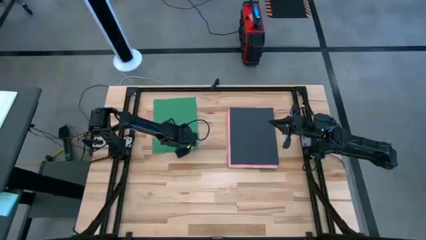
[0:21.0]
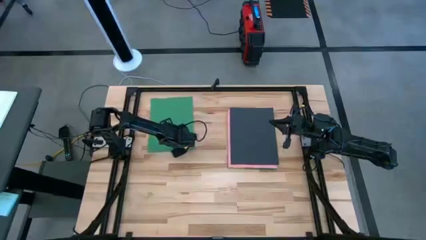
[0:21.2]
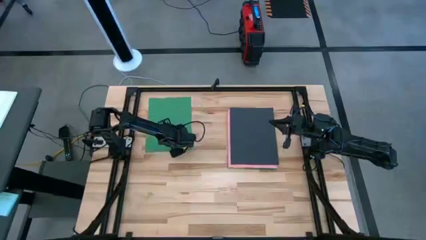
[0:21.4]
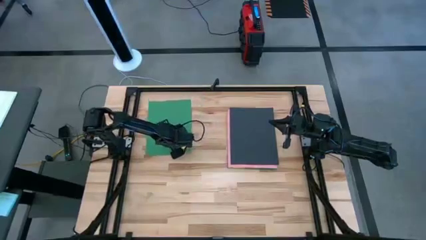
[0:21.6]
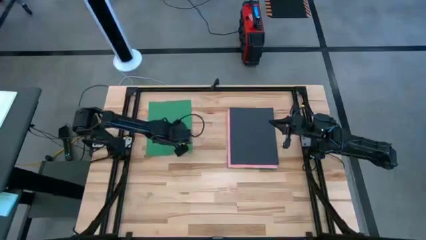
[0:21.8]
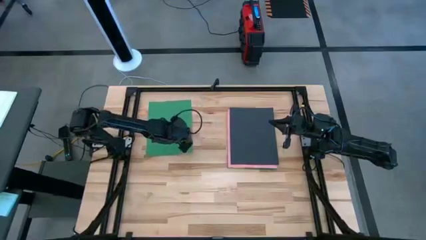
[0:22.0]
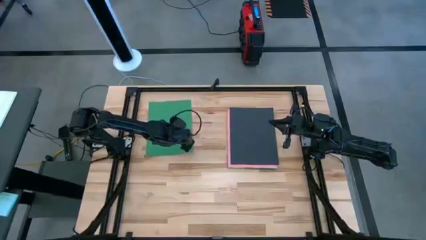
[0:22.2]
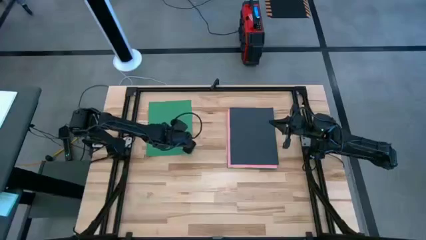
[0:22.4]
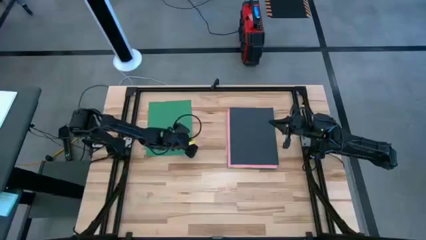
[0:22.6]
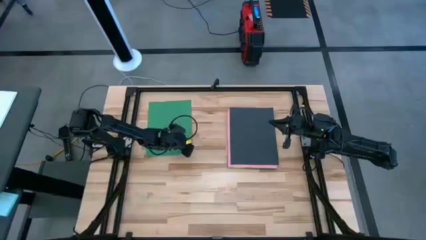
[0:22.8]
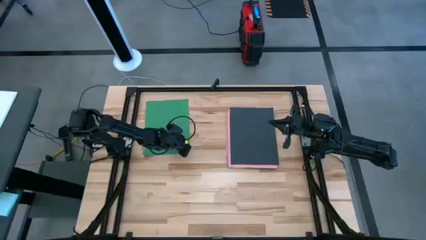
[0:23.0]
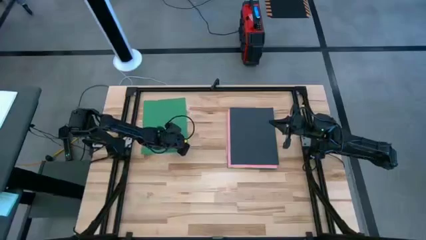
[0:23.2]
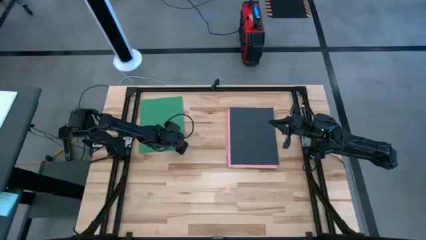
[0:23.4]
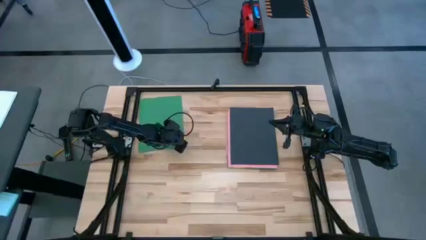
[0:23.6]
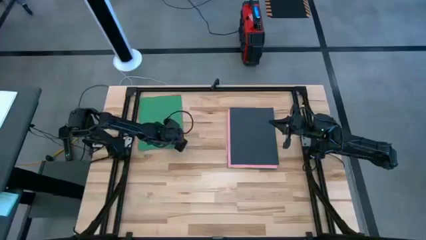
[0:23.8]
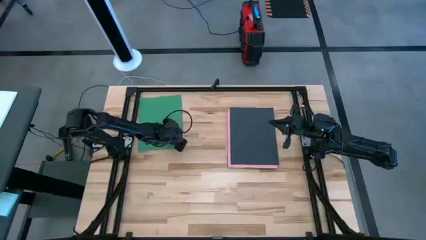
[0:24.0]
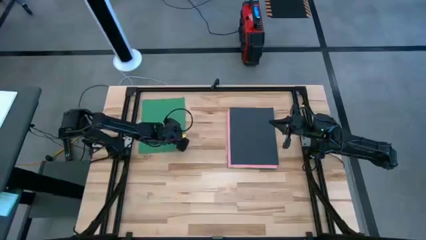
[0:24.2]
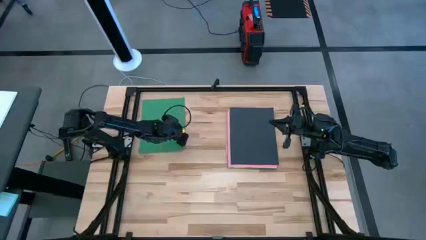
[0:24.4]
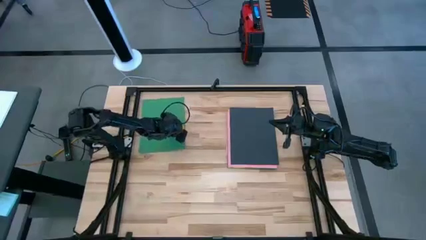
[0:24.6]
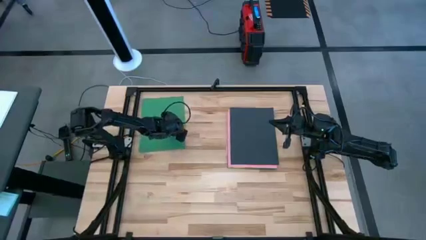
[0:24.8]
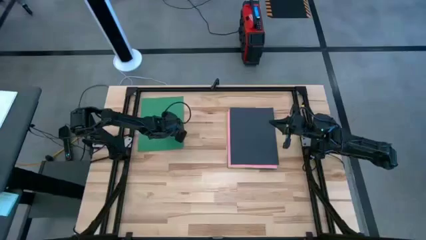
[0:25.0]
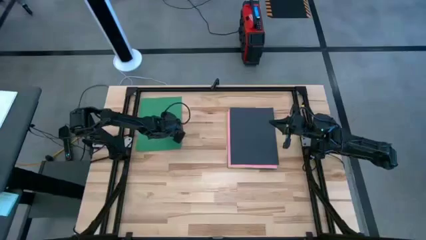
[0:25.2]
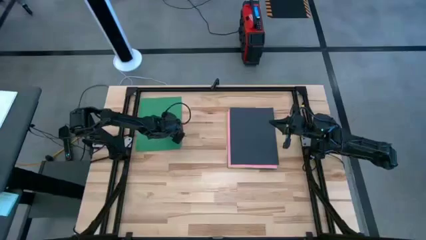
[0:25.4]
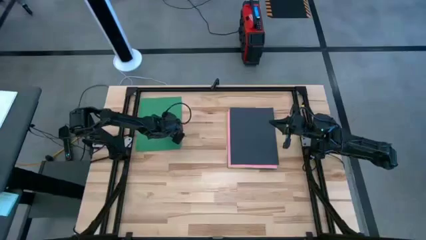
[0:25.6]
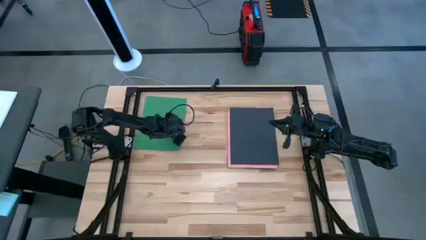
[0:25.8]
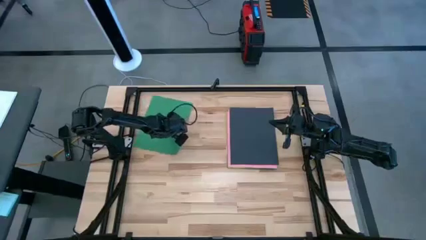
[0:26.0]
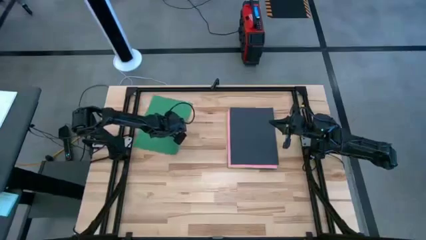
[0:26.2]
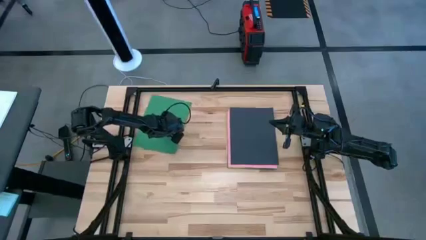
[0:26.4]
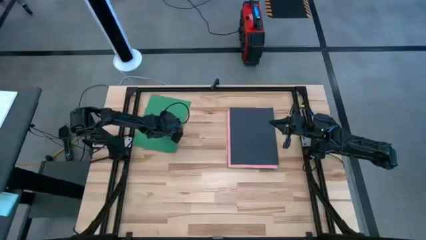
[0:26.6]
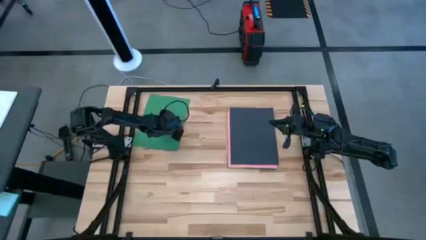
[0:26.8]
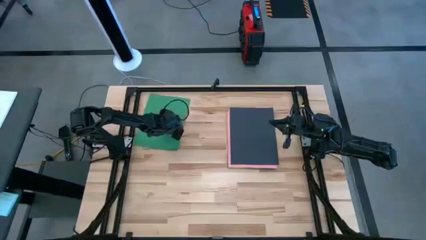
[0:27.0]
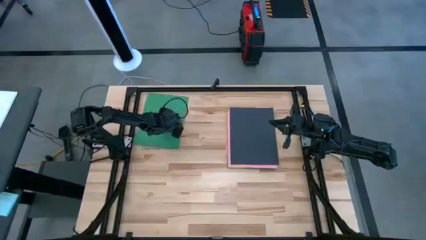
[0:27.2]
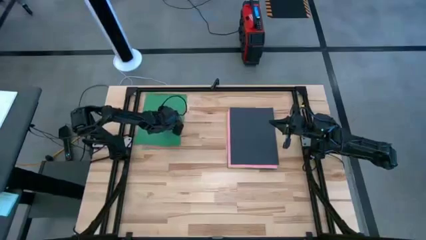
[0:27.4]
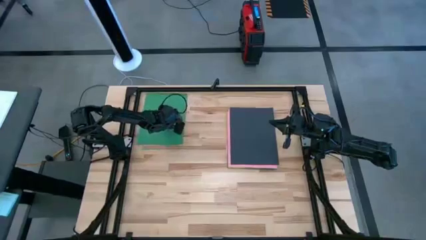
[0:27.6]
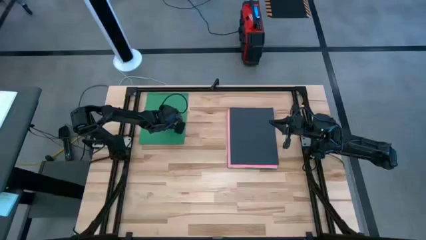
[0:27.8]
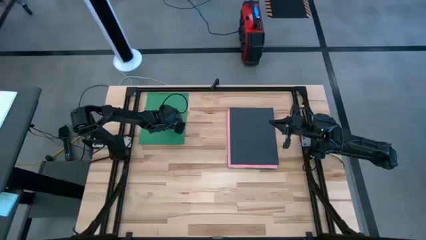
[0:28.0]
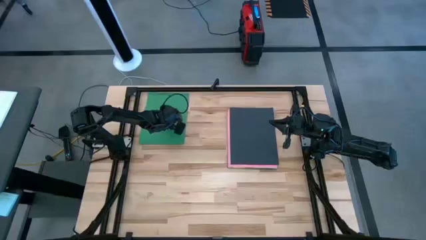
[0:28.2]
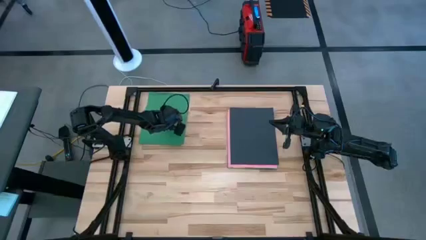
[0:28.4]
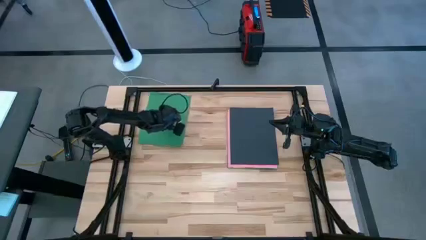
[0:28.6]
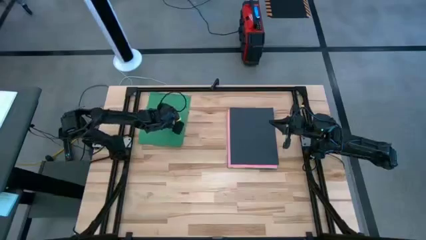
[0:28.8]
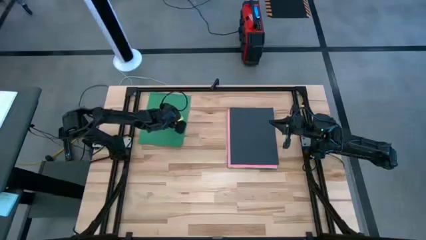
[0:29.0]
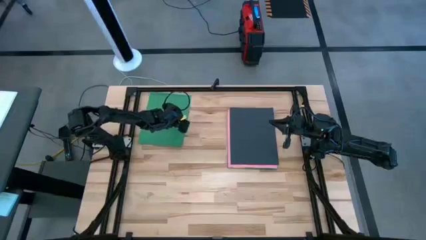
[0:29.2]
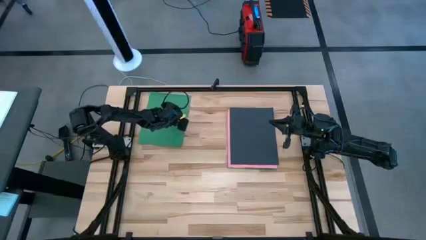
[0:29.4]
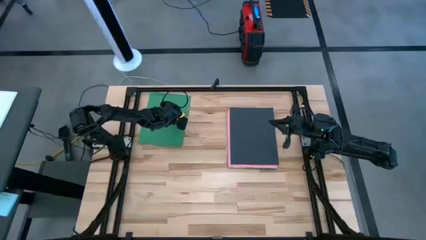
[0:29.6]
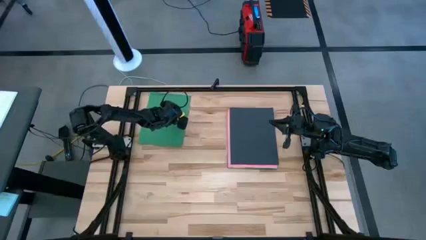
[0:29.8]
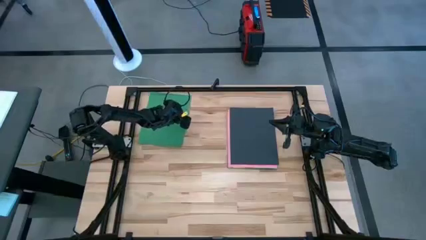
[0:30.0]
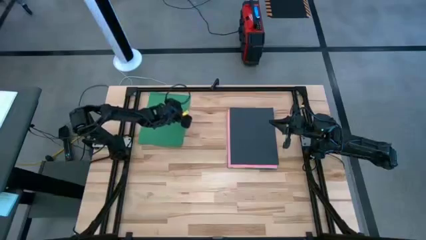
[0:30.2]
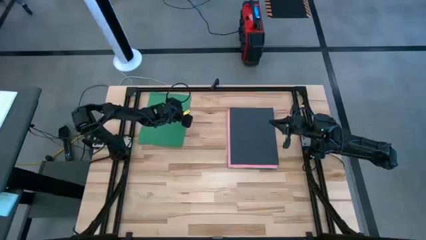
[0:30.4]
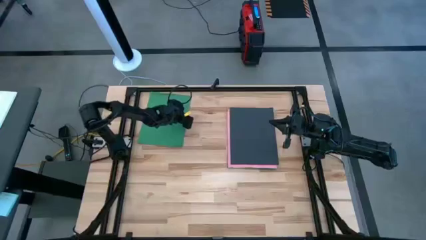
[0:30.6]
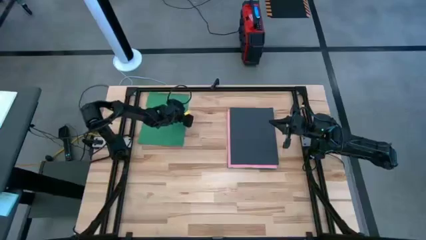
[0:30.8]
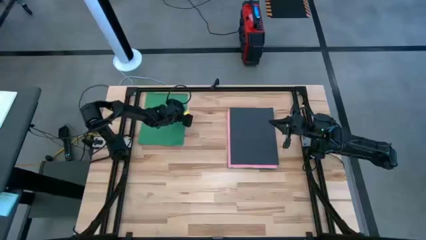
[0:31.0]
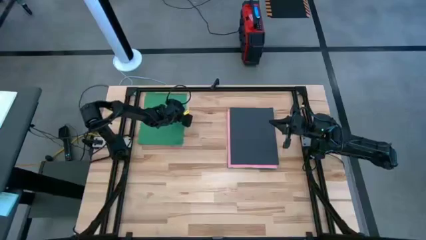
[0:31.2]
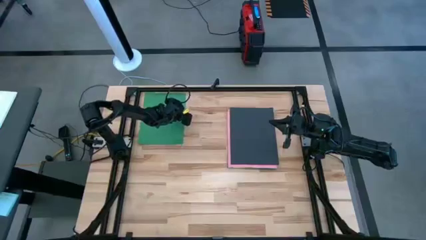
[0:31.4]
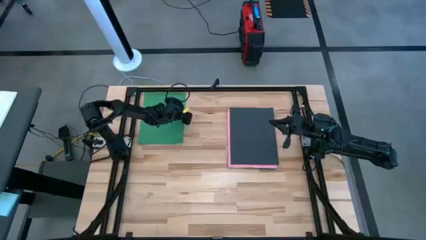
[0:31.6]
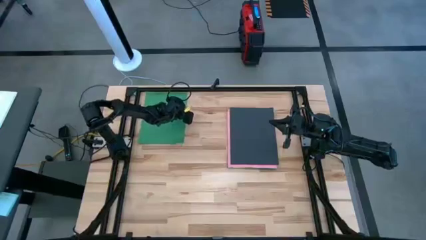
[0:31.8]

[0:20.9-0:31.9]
Task: Organize paper
Move the green paper to the top left of the table
